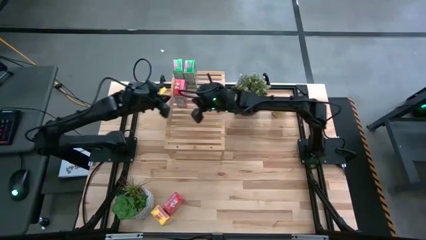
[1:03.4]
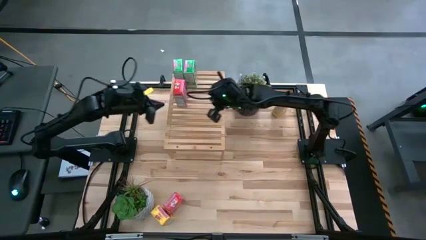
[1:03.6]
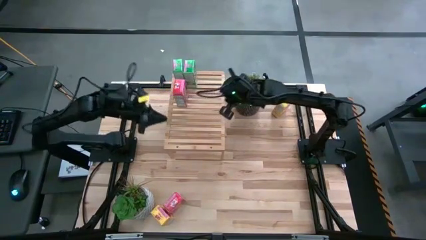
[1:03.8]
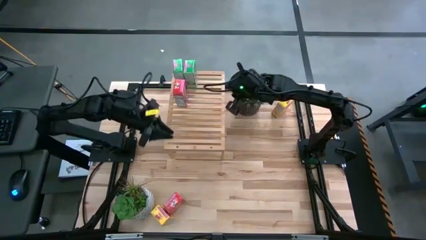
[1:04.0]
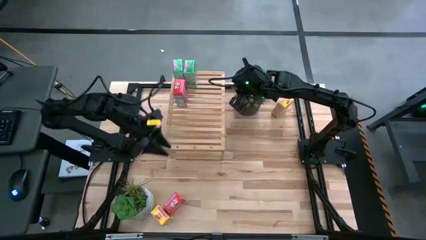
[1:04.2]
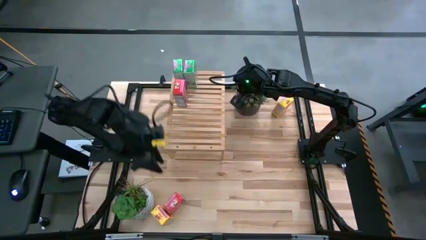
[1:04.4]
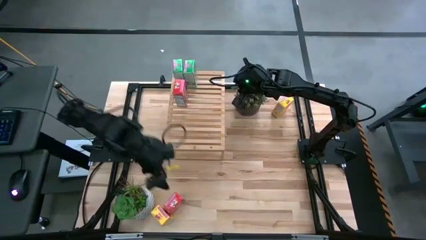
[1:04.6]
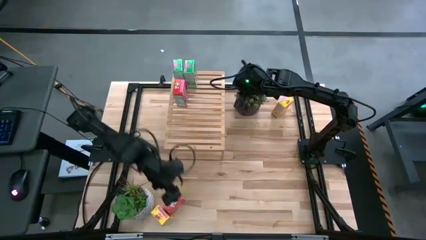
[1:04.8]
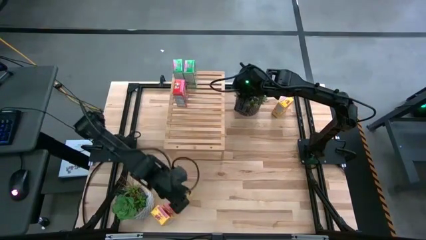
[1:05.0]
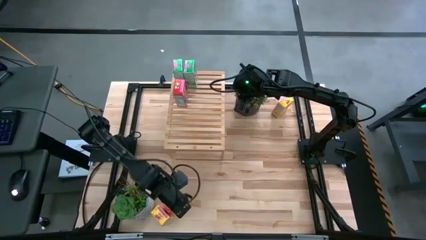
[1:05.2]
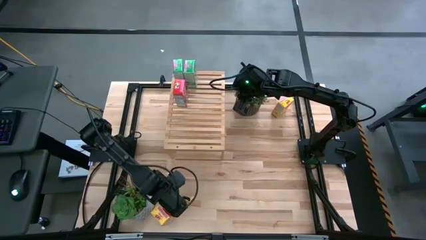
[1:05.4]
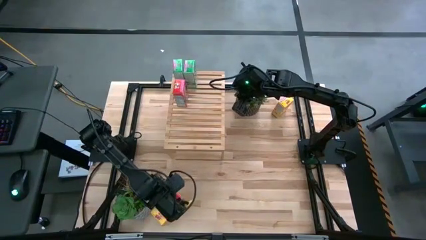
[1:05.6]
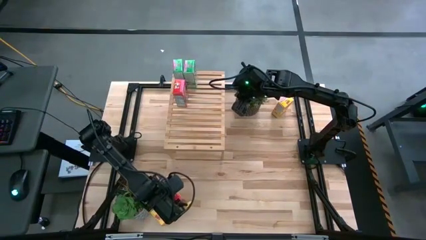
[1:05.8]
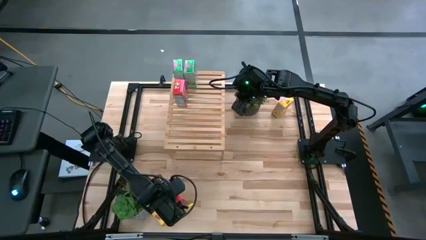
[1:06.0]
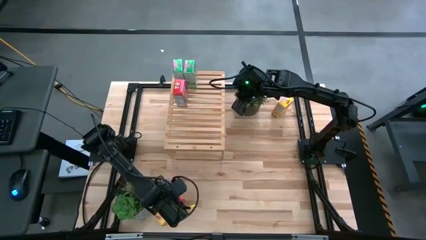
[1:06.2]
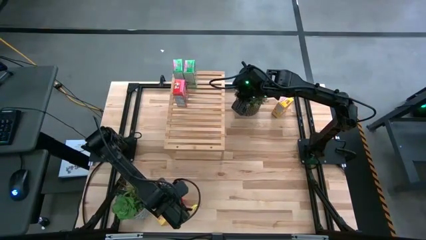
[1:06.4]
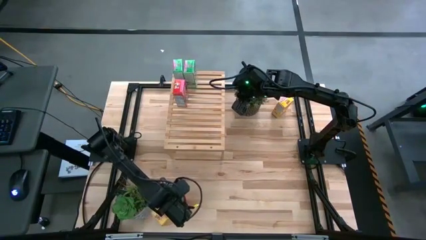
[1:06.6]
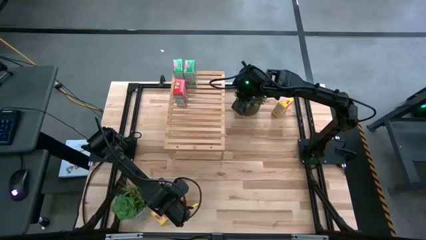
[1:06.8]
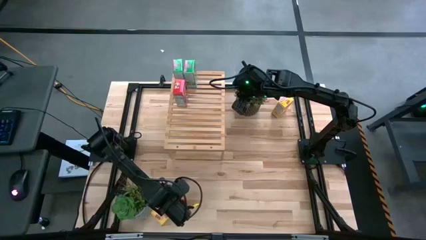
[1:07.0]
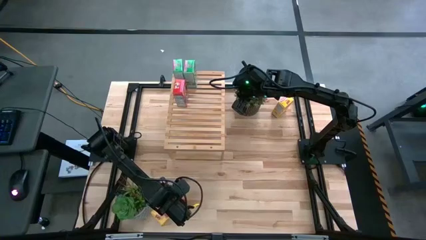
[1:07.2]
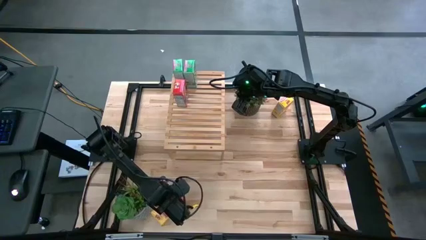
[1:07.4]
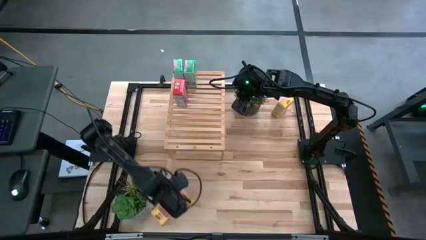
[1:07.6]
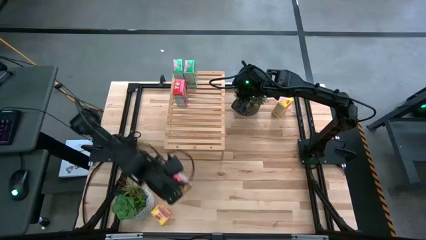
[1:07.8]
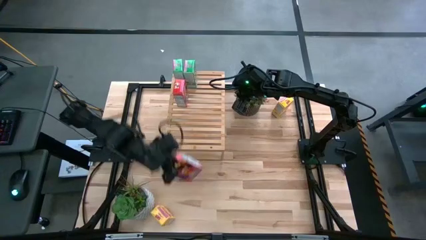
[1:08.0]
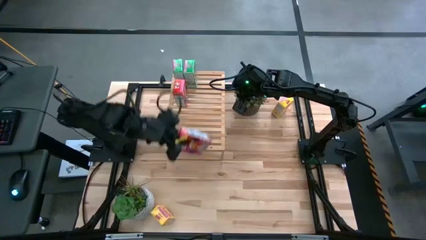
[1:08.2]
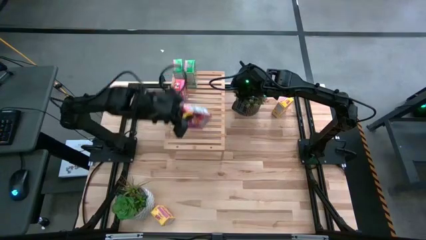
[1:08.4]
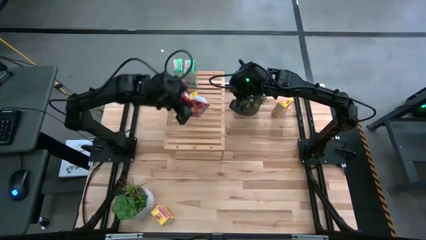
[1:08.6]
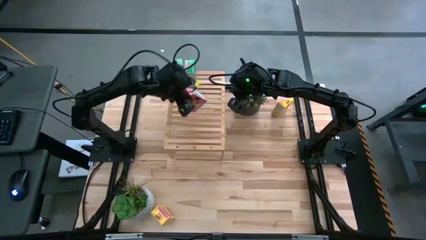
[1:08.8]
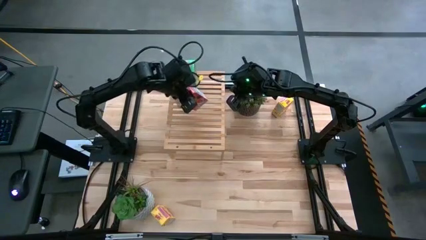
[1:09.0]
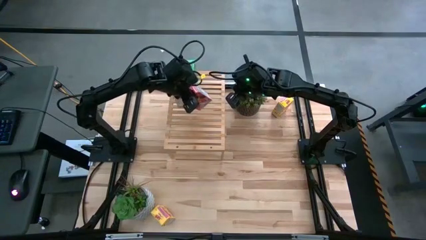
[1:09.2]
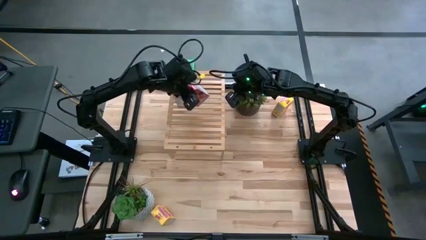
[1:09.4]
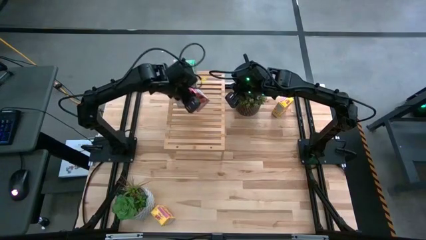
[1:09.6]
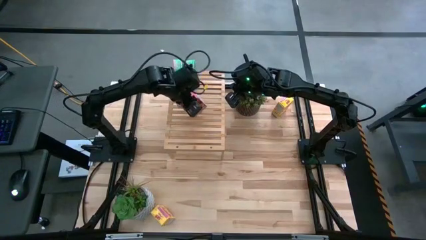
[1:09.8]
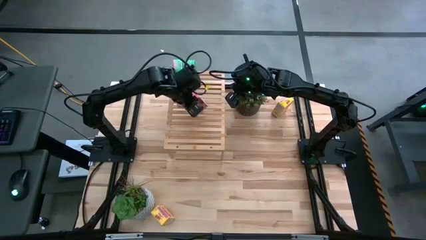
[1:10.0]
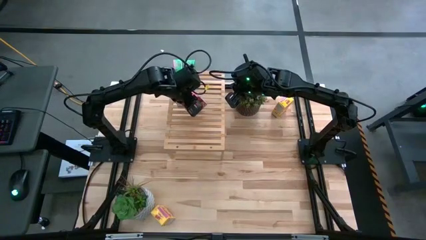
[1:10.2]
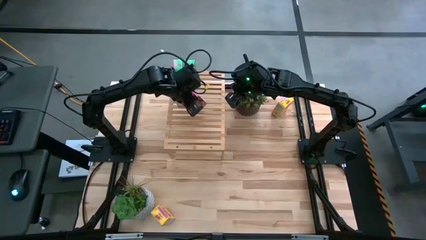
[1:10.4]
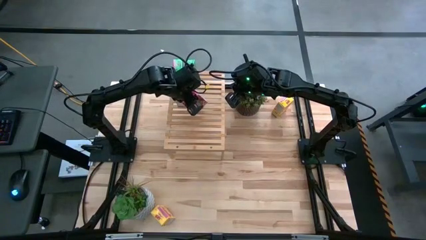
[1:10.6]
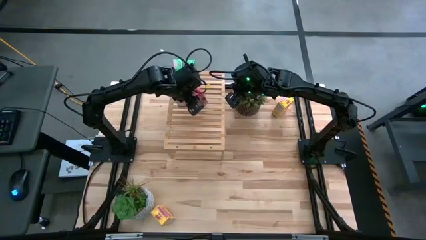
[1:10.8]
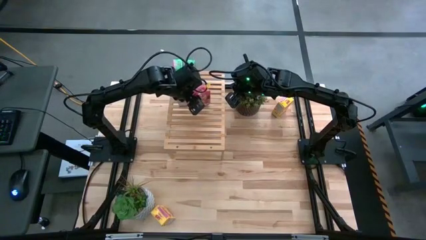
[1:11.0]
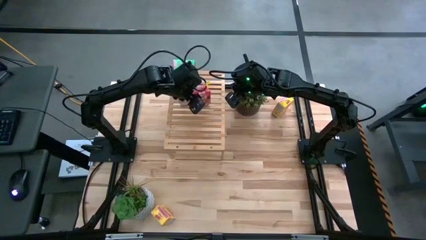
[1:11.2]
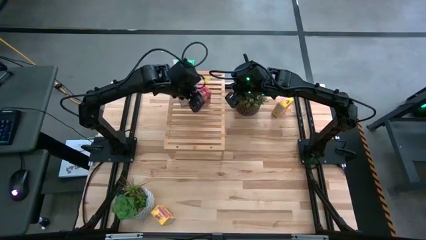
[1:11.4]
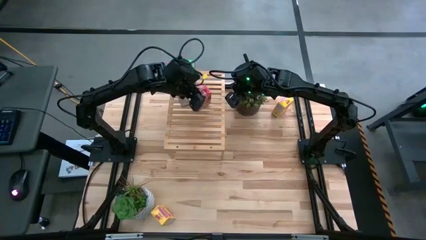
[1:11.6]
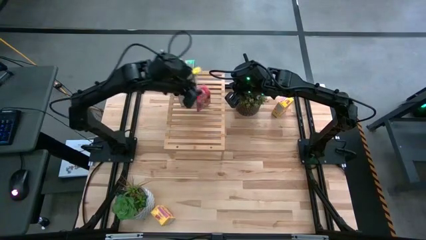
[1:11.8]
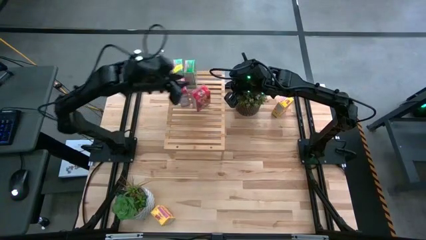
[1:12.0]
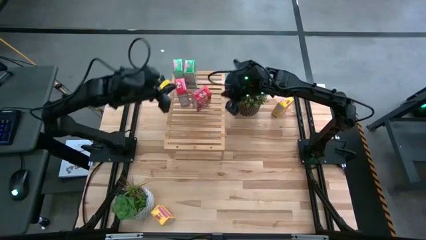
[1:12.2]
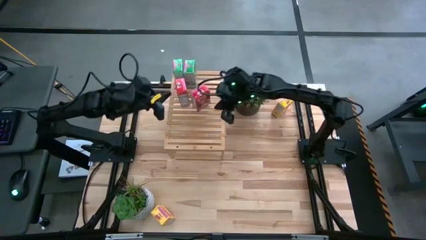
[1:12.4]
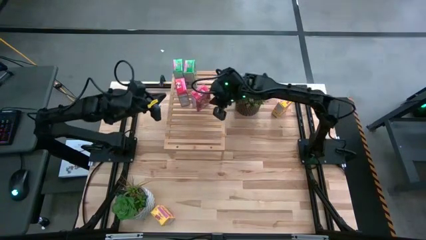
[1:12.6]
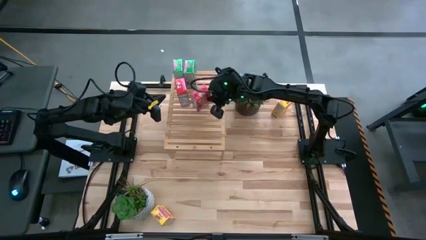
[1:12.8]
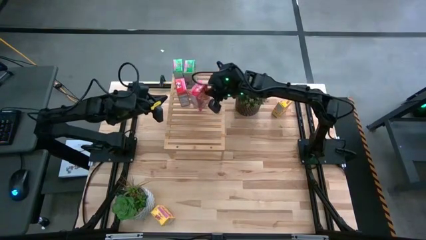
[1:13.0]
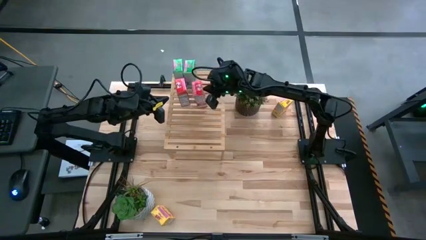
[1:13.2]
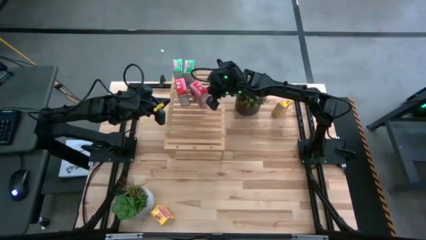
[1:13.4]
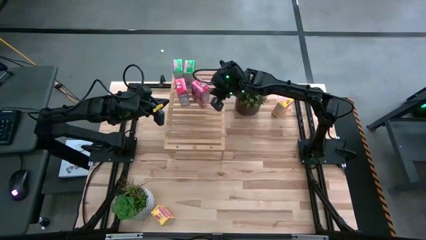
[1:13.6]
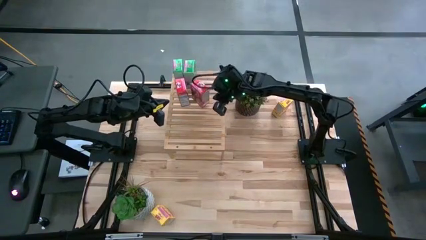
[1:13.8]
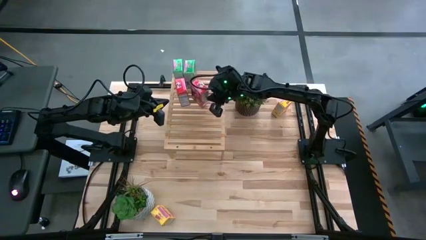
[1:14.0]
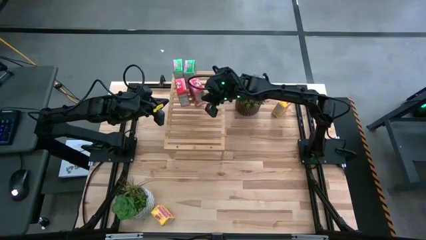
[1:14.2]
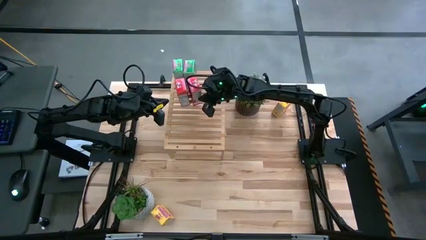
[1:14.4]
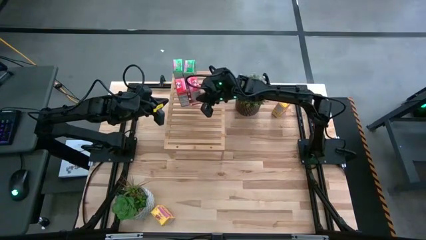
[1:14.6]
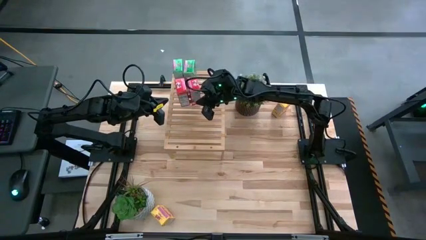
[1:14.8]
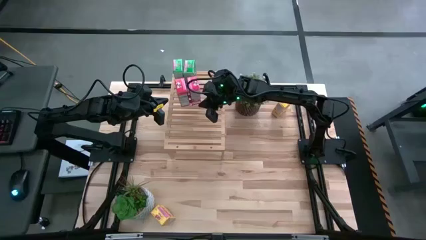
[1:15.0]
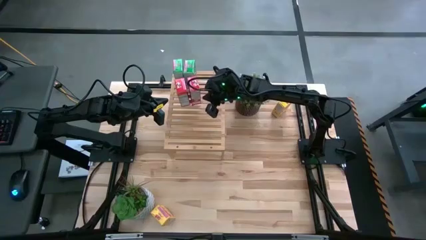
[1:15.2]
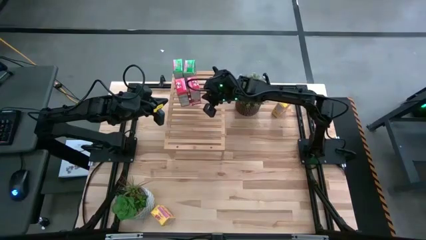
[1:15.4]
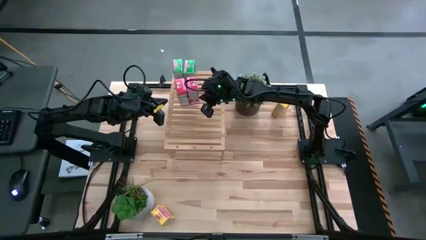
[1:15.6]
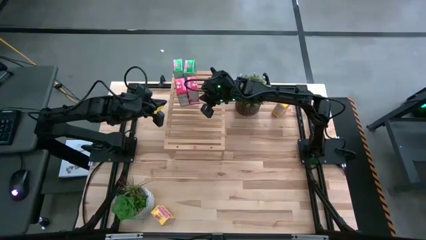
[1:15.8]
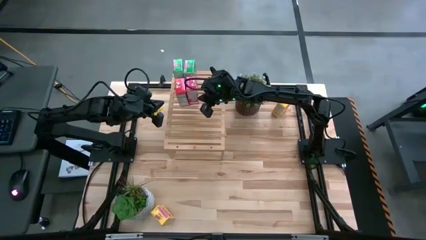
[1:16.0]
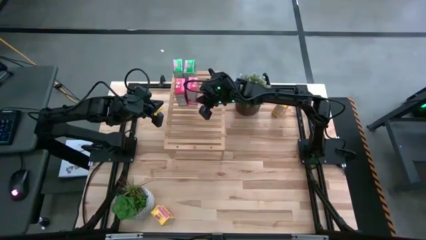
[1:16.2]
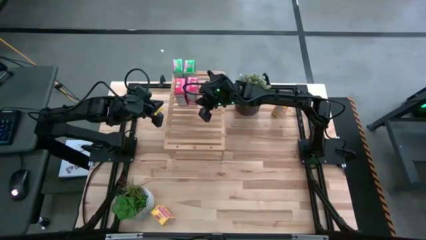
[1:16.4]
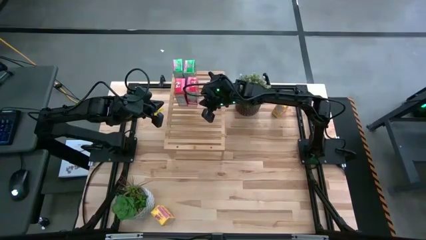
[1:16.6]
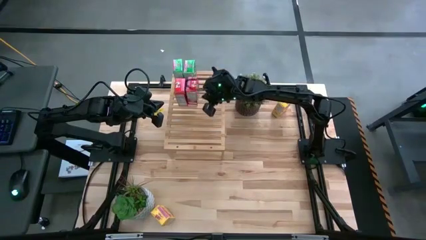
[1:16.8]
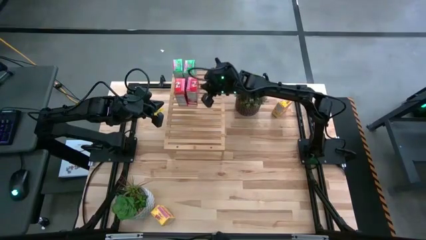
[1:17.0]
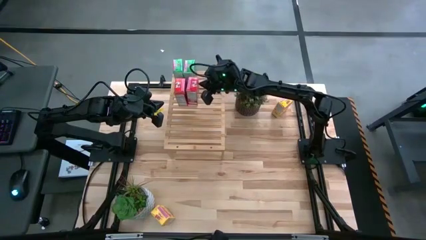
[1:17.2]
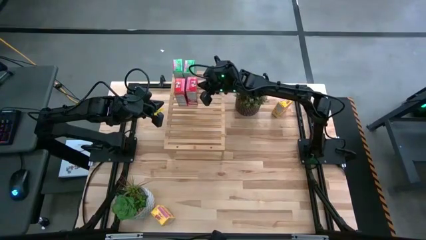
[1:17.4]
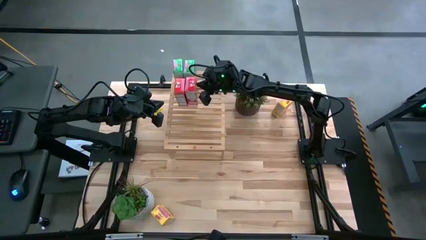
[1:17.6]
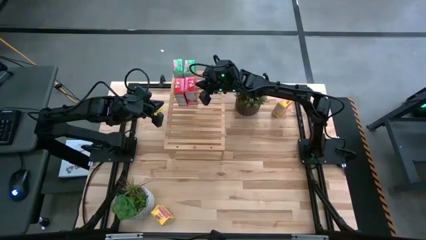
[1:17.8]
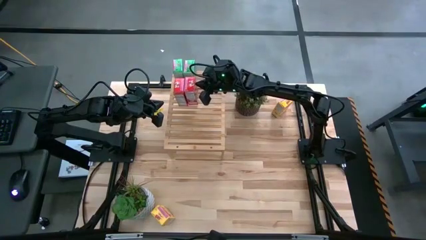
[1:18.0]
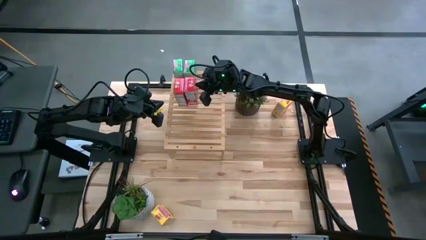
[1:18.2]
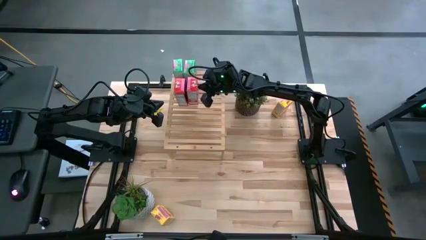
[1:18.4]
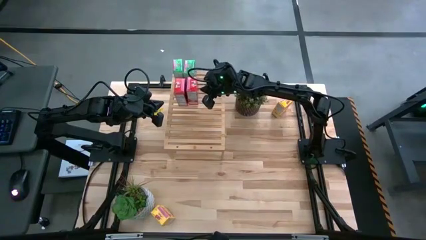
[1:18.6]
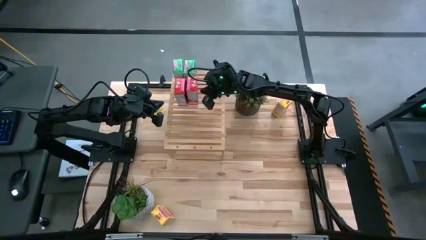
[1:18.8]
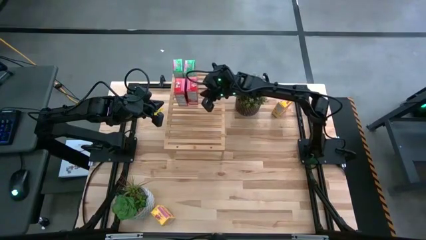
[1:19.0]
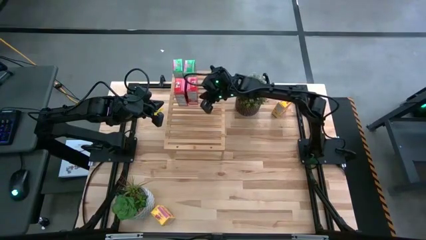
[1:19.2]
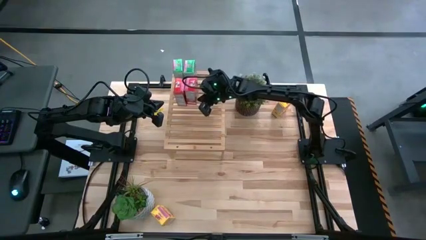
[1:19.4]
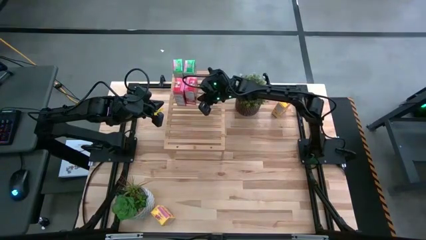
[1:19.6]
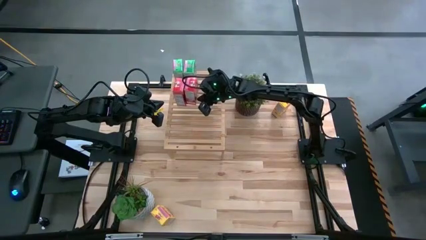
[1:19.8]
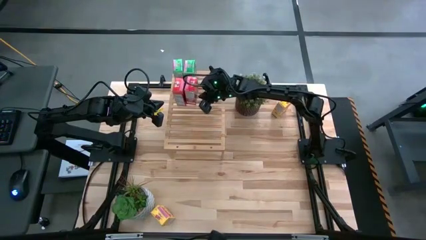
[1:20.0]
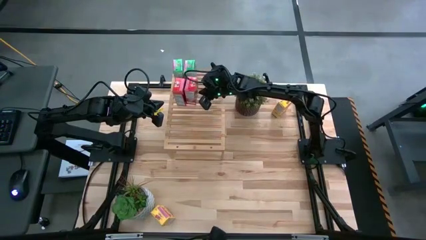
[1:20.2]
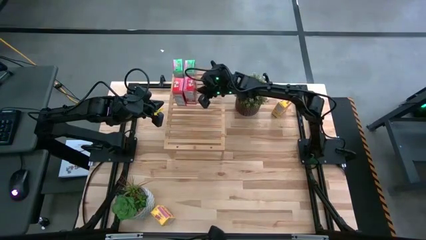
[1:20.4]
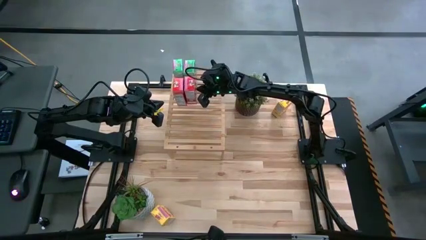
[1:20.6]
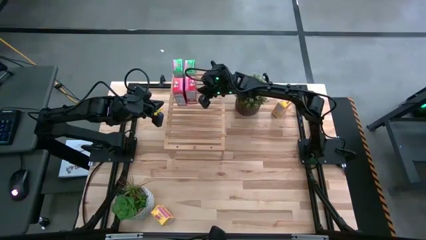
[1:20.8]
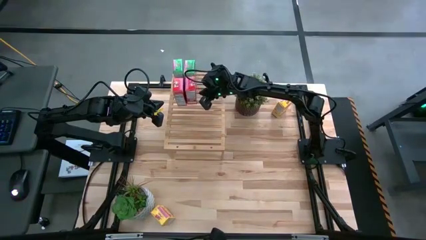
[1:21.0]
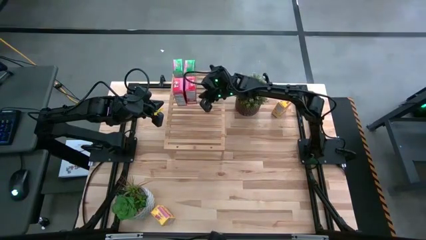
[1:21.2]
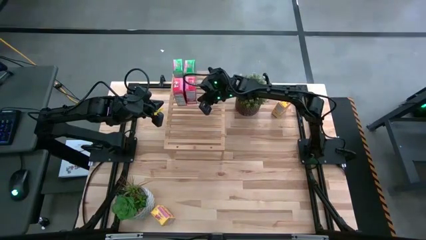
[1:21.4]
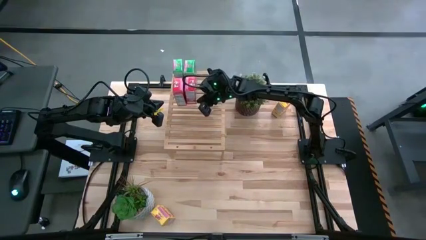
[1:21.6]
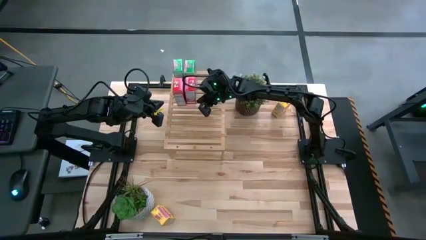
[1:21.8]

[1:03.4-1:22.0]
Task: Stack cereal on shelf
Put the red cereal box on the shelf aligned with the other red cereal box
